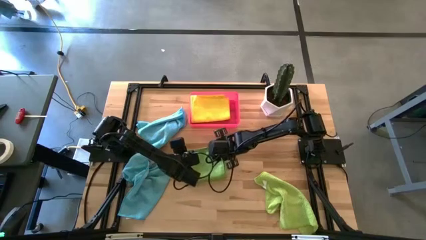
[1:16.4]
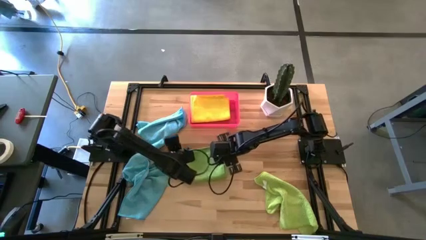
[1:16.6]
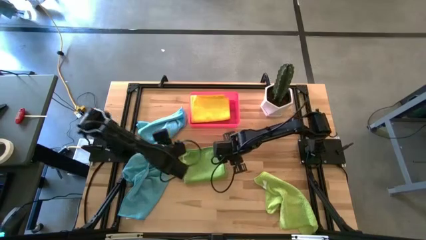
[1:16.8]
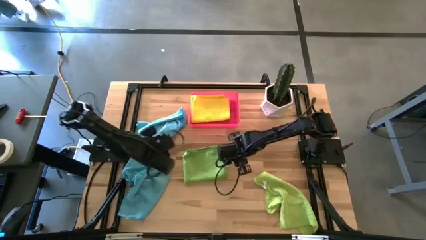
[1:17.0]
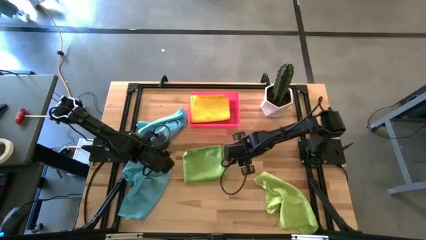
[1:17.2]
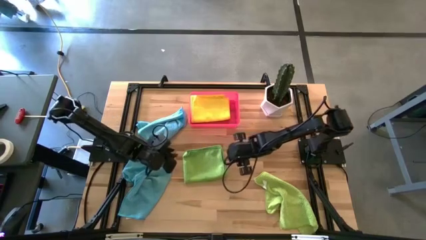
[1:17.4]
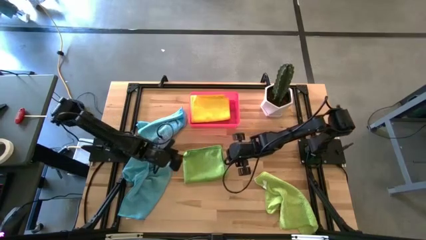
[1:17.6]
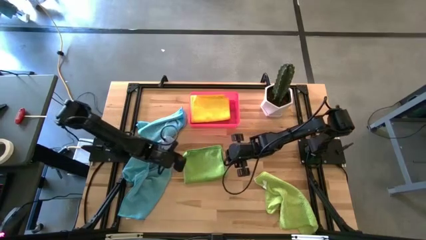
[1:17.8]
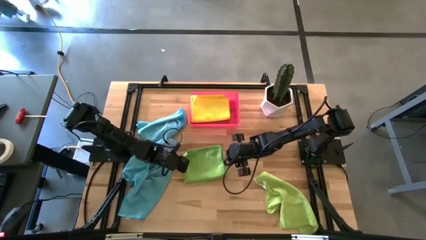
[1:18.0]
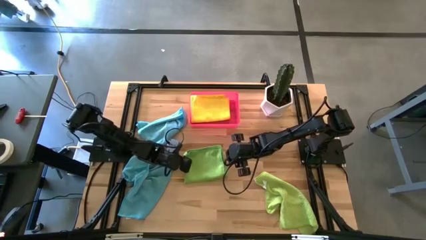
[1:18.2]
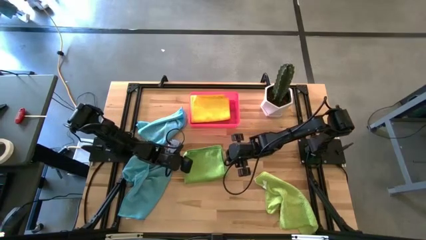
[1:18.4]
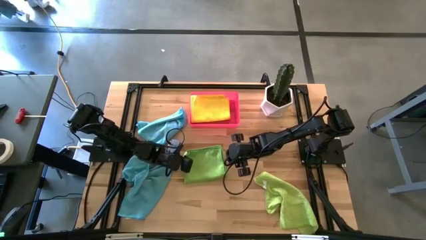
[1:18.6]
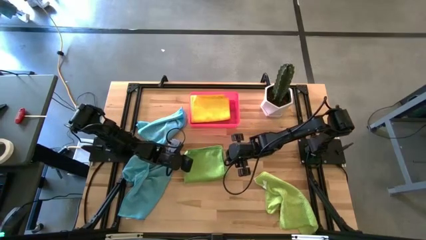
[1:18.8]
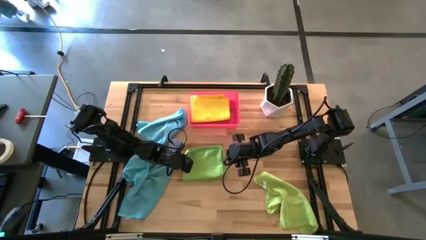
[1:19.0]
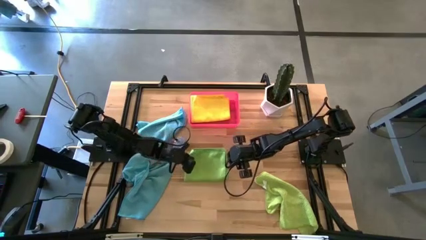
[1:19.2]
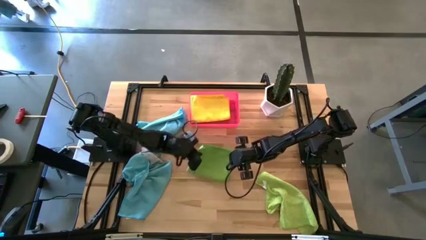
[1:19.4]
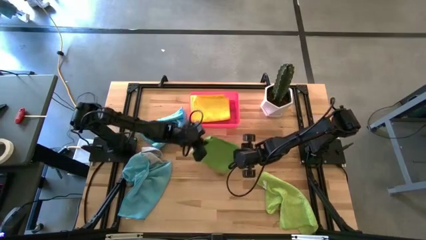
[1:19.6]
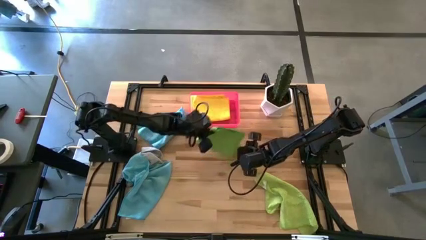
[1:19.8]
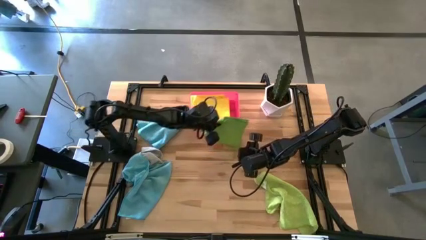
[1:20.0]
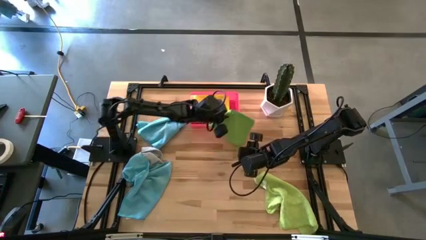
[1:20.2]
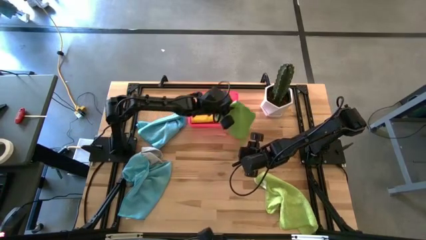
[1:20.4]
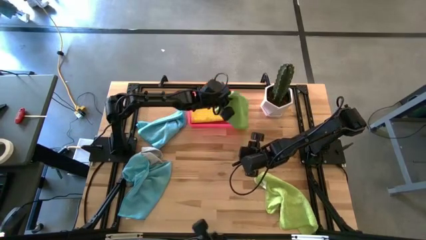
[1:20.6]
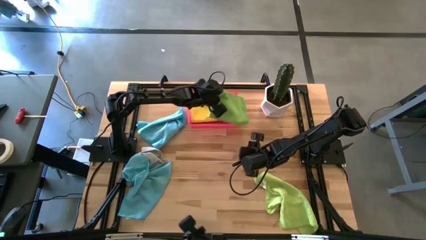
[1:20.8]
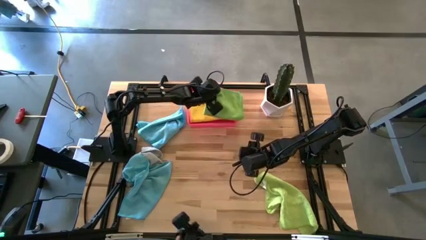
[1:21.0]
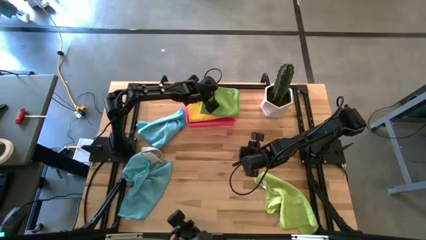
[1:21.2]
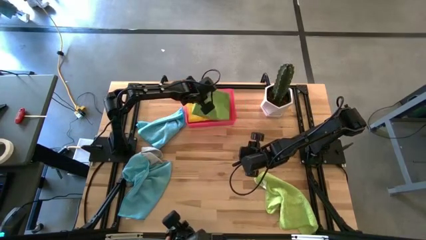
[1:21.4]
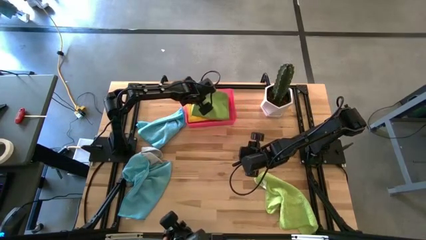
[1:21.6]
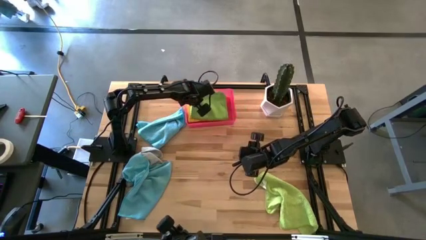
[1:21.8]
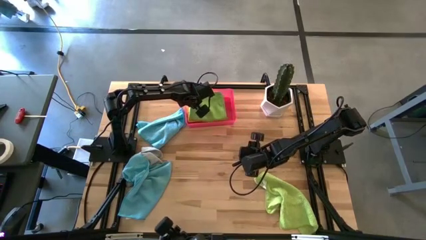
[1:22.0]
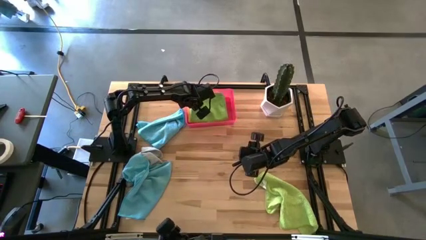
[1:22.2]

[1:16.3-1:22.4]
Task: Fold microfiber towels
Stack the folded green microfiber cloth on top of the folded yellow microfiber cloth

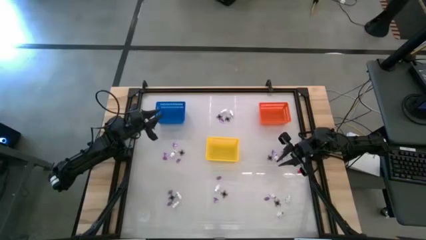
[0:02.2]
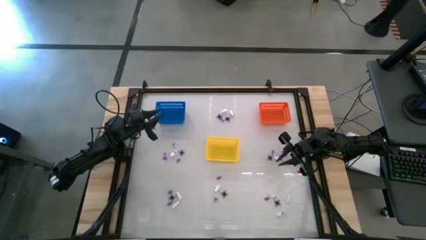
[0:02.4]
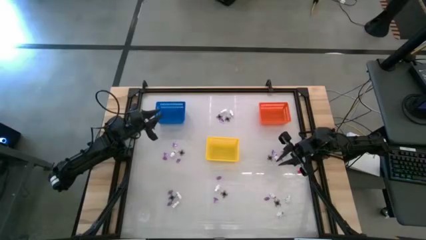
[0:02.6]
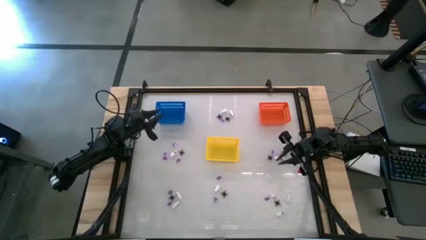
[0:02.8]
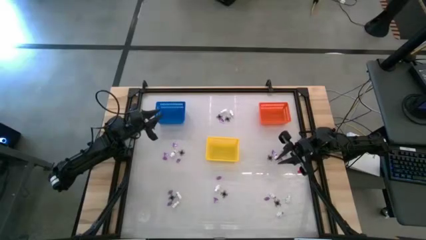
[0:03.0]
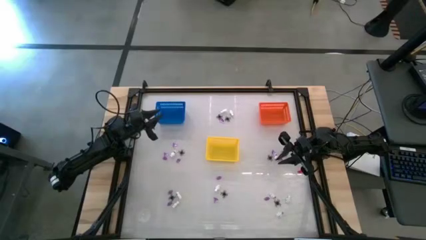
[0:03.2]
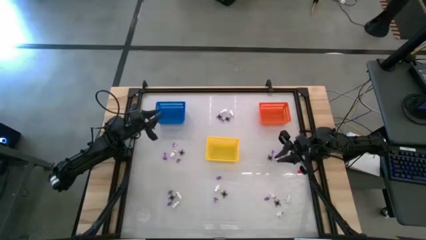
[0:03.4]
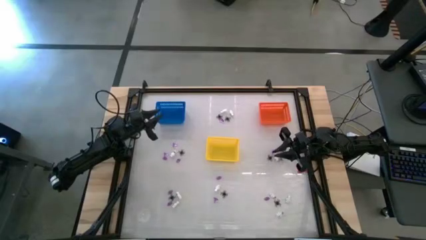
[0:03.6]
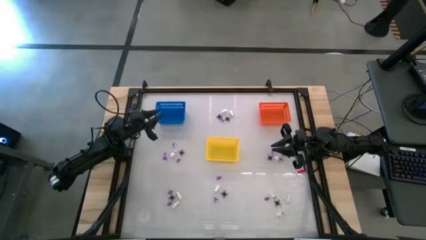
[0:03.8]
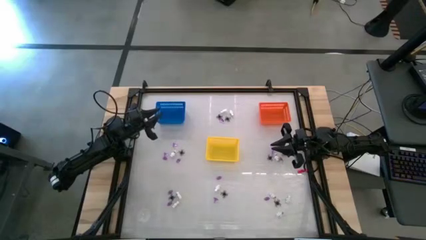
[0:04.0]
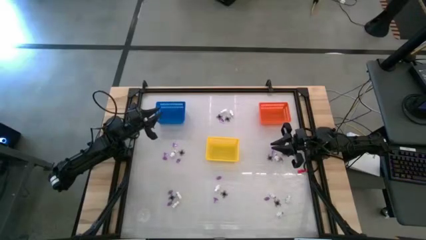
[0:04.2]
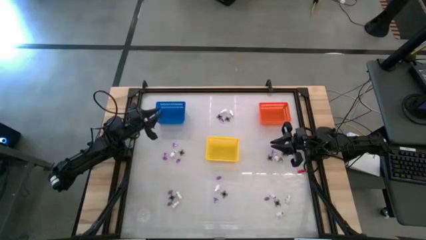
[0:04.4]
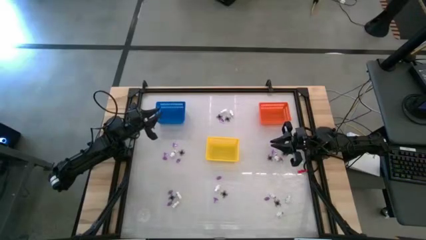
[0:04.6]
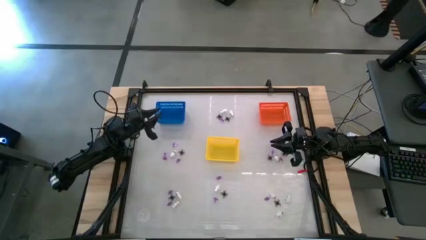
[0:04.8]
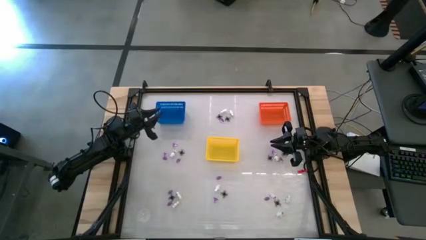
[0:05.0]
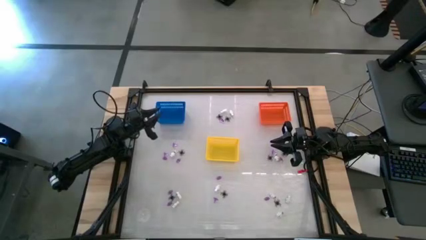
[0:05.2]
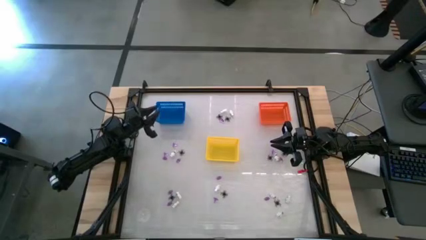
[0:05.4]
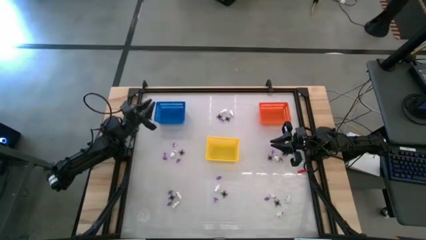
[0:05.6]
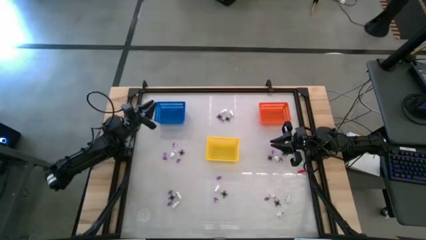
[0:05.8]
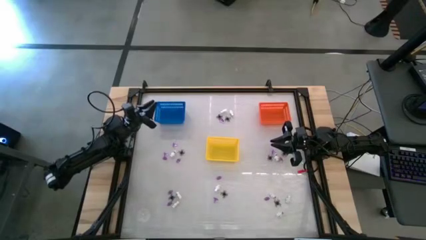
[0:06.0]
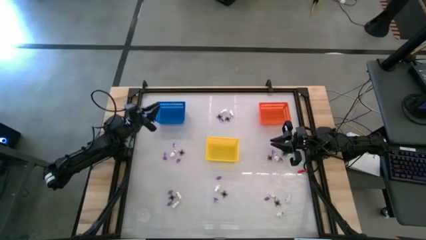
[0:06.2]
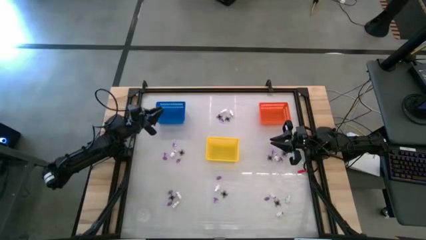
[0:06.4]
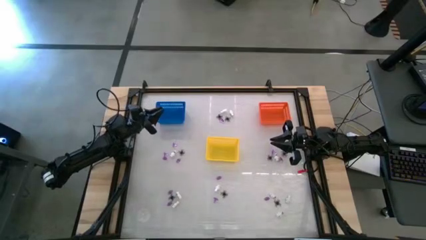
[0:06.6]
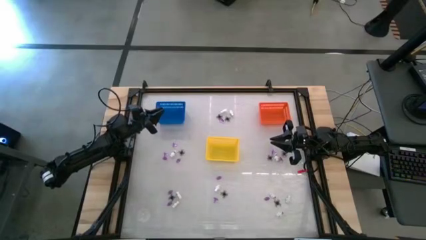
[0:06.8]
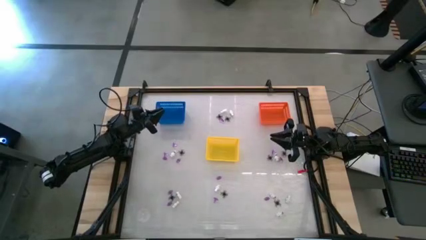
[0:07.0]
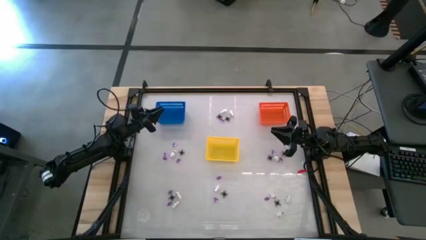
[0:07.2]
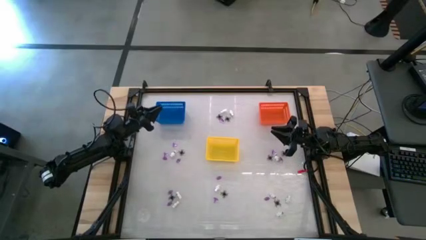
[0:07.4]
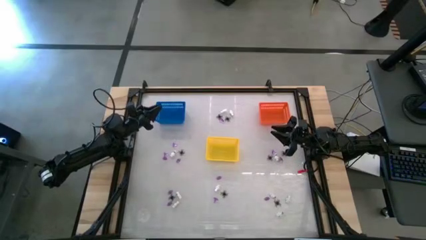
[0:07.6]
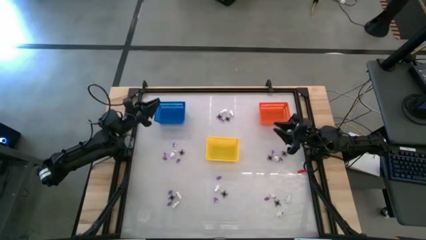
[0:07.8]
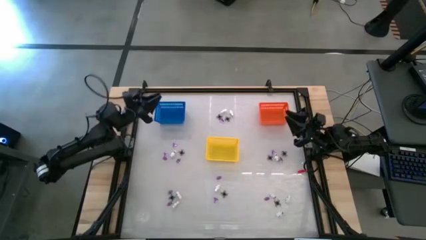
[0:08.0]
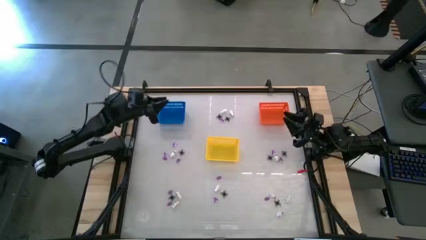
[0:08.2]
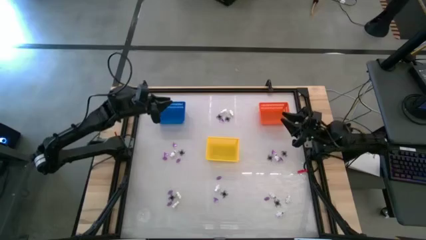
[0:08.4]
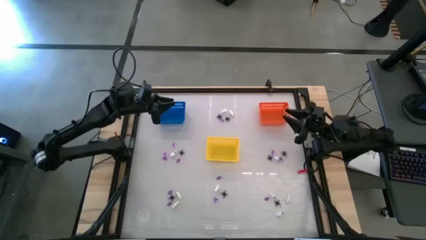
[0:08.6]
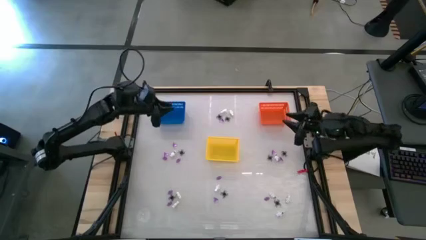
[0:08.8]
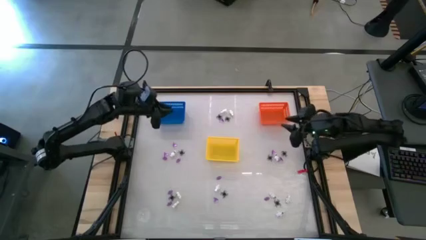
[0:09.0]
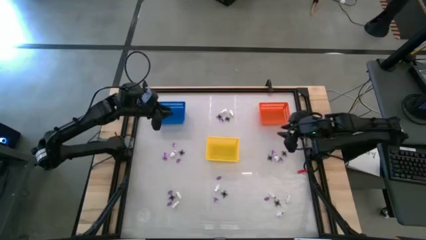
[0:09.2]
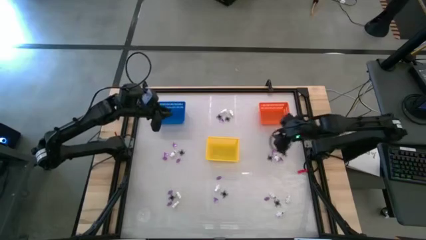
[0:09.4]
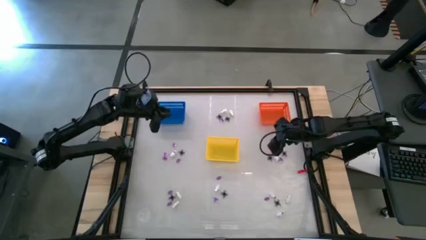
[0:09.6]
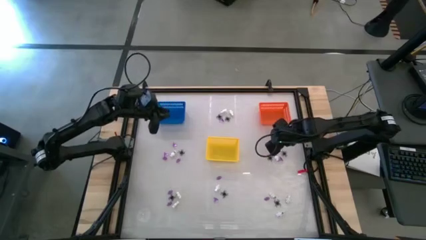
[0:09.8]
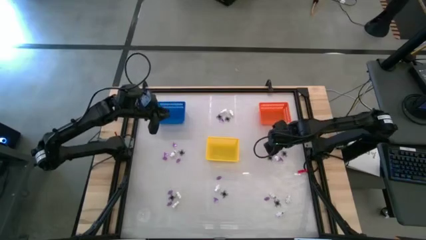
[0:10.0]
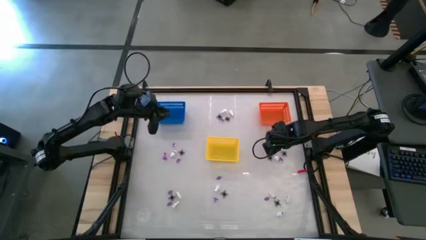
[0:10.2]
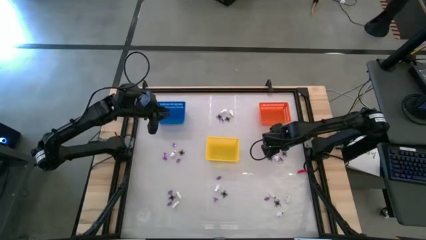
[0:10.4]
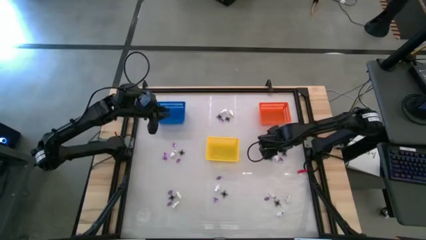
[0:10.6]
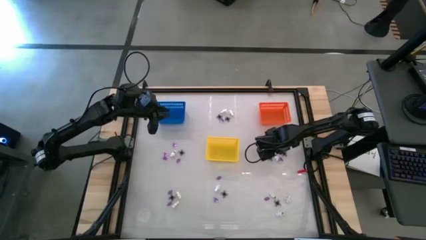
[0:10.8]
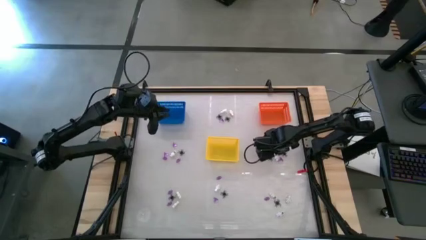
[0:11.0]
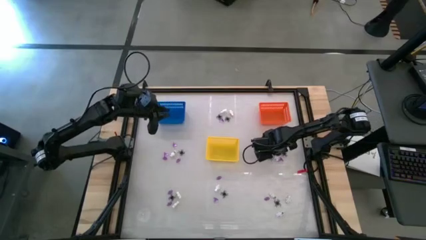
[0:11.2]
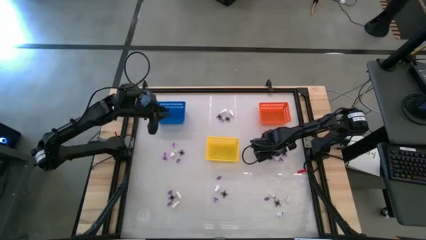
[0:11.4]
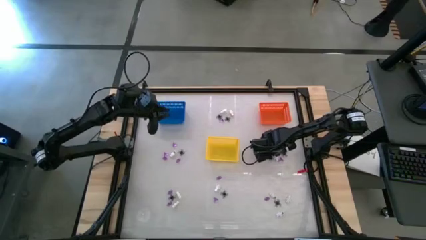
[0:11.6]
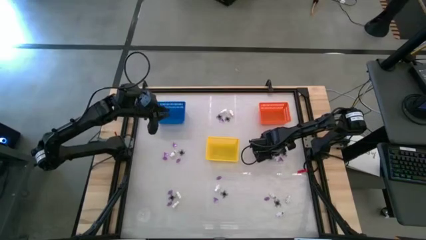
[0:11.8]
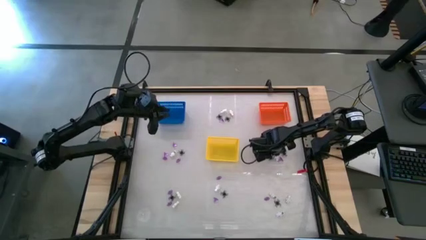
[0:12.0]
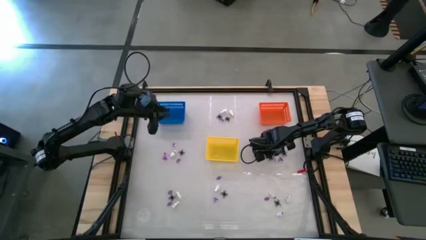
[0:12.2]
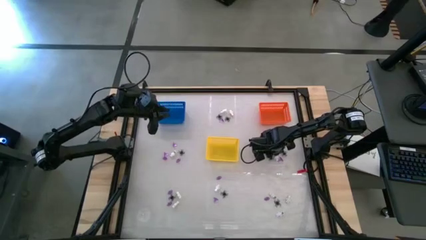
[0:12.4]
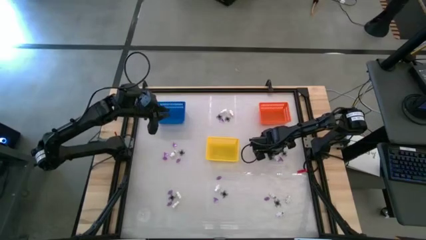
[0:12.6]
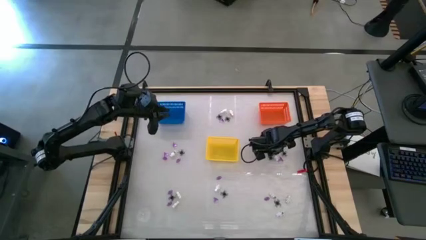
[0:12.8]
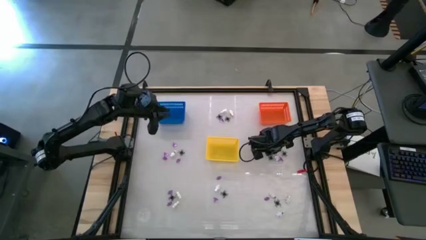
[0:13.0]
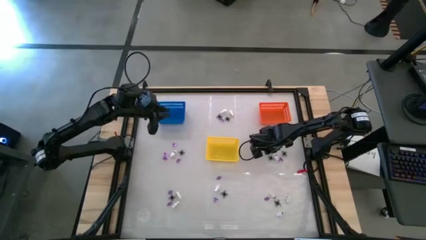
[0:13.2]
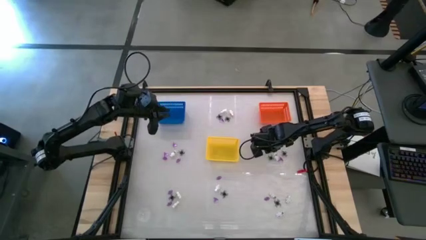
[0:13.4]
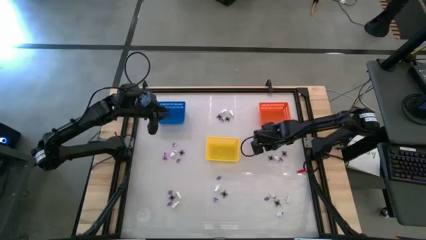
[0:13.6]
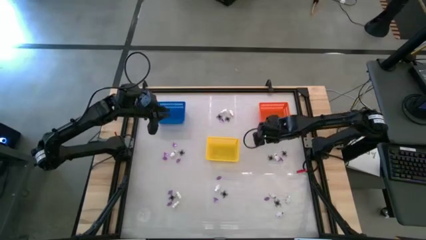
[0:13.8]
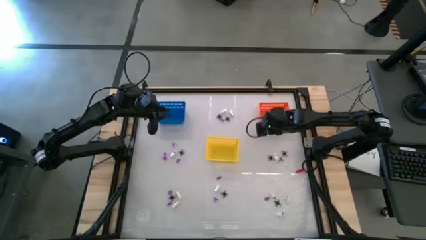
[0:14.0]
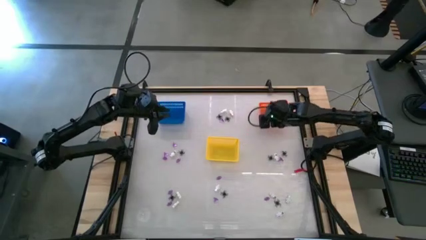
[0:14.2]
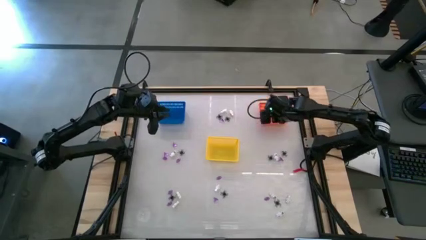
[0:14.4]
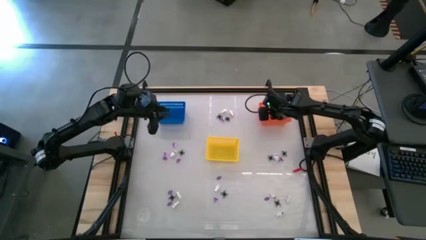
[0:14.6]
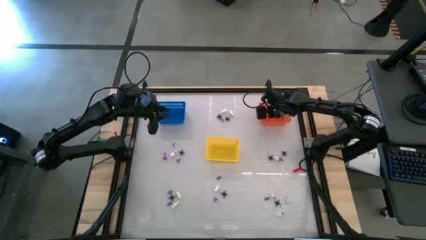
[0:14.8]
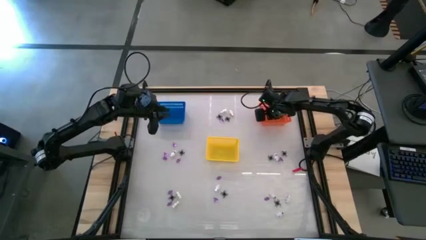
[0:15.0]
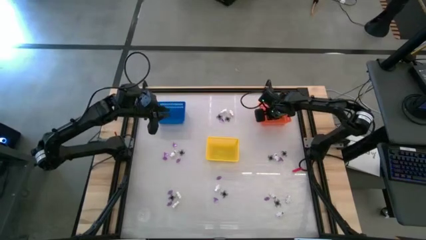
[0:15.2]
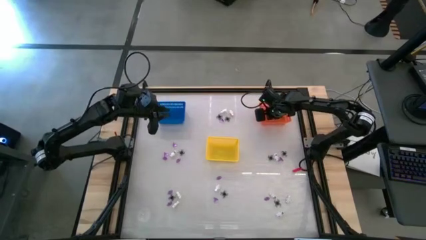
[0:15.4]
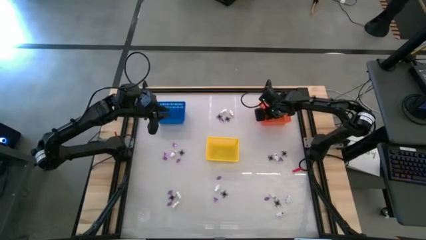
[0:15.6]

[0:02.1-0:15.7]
Task: Sort Halloween decoration
Put the purple witch hat toy into the orange bin
